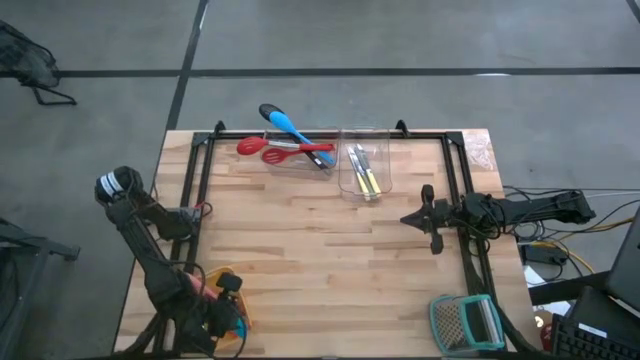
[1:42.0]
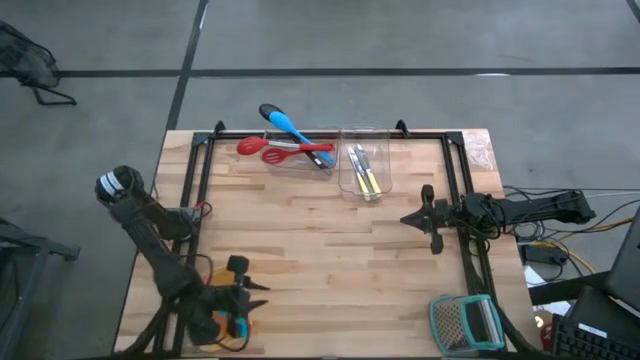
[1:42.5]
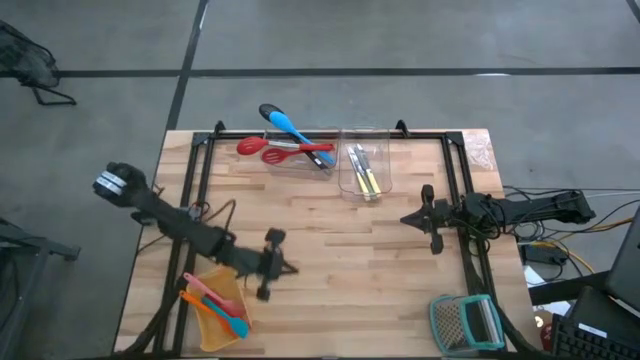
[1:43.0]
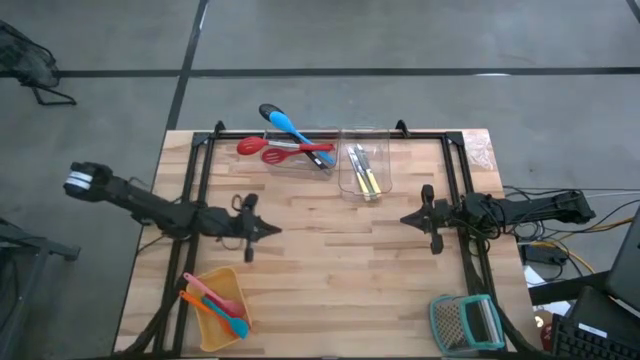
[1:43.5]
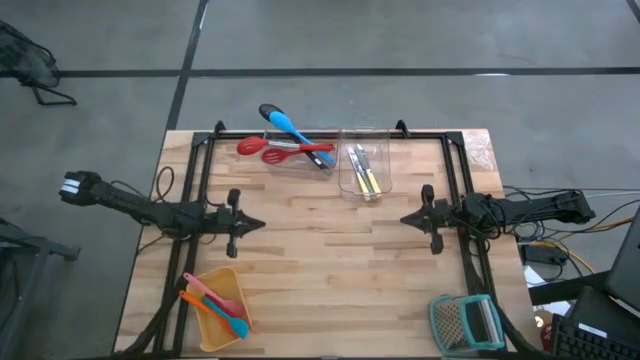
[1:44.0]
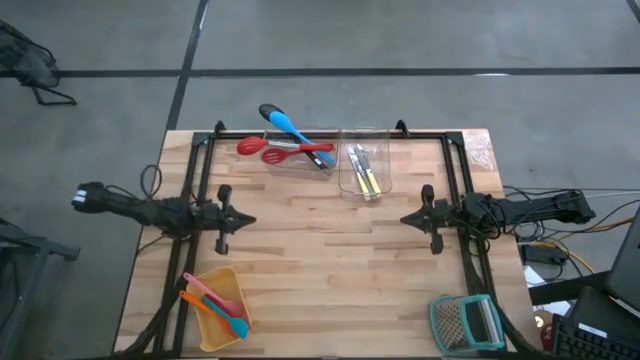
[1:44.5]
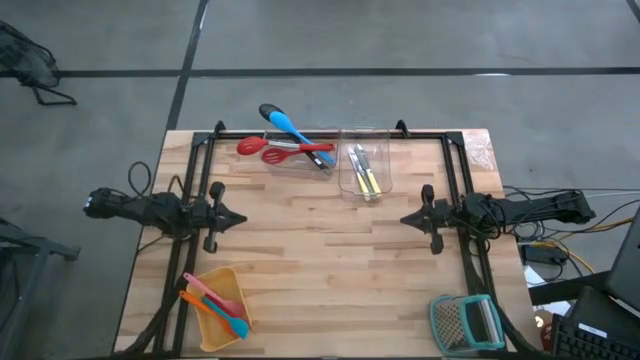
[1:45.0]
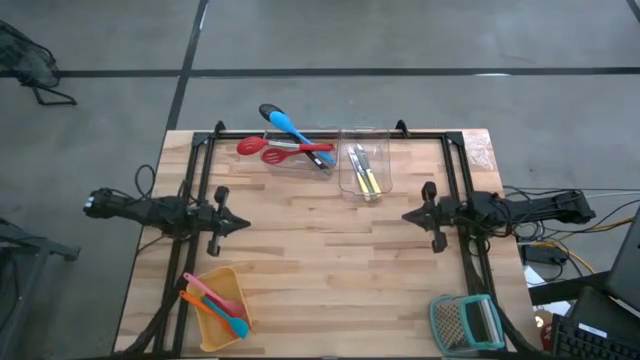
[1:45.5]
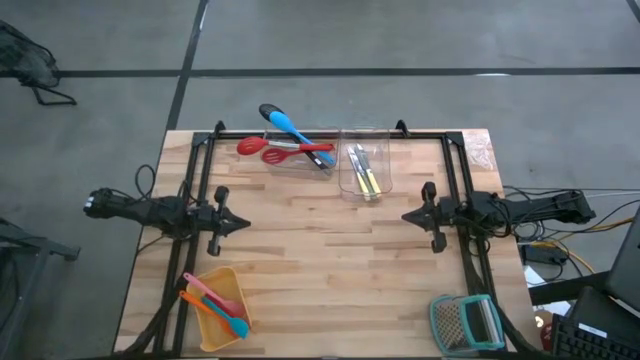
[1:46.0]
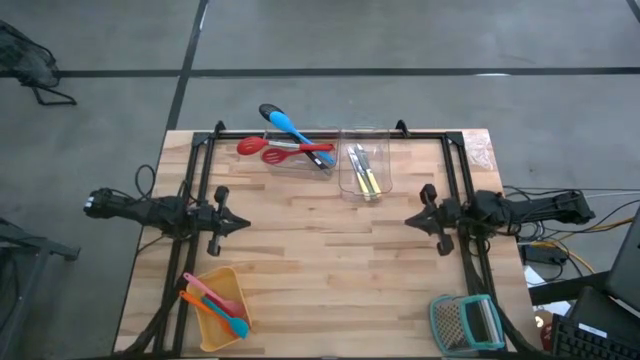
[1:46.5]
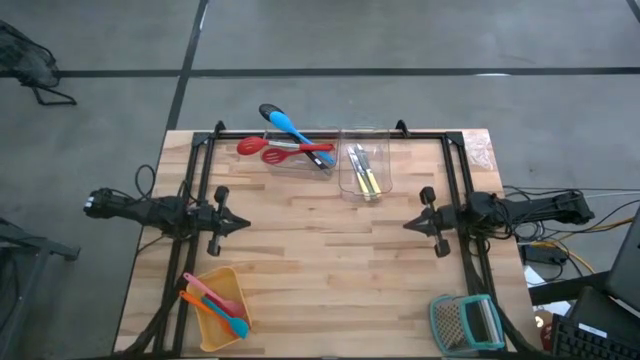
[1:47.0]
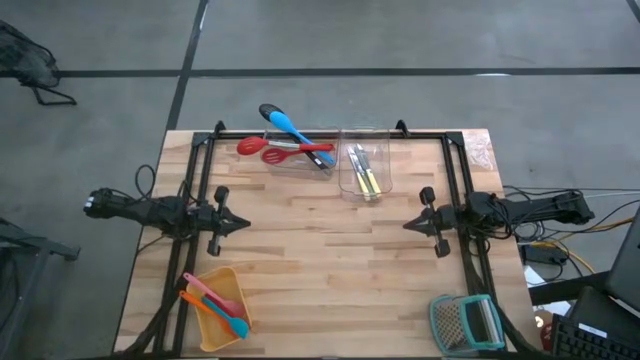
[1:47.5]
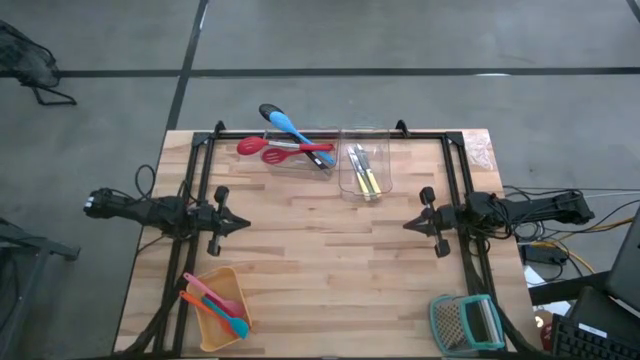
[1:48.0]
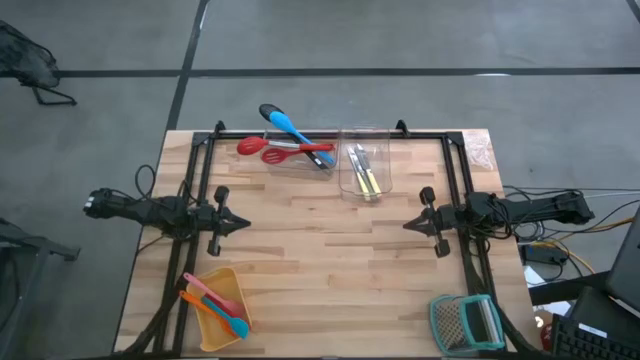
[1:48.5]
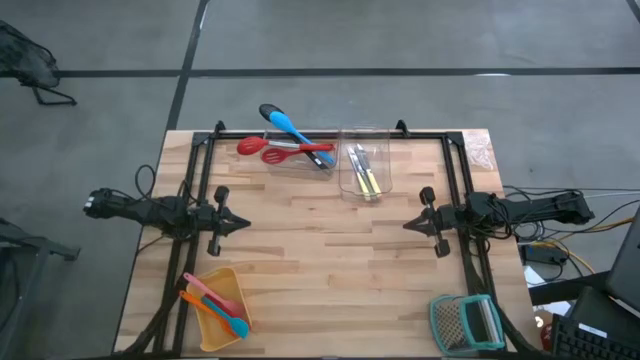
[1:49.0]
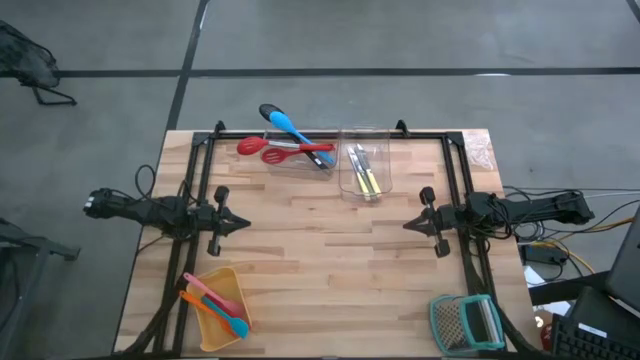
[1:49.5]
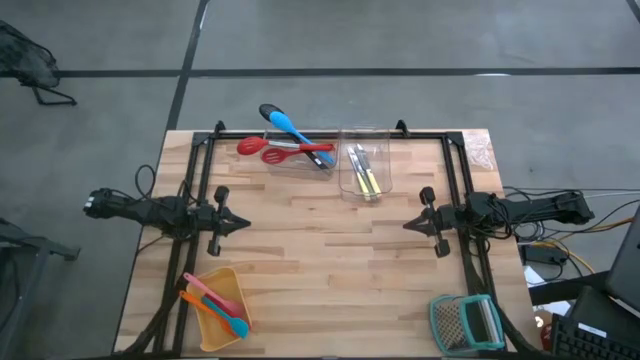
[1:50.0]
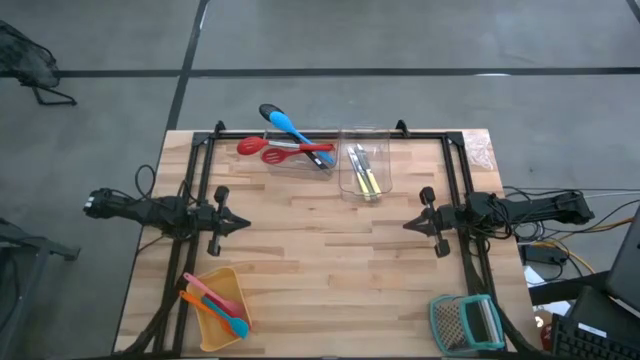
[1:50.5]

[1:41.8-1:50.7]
Task: Pick & Place Kitchen Items
Return to Home Position

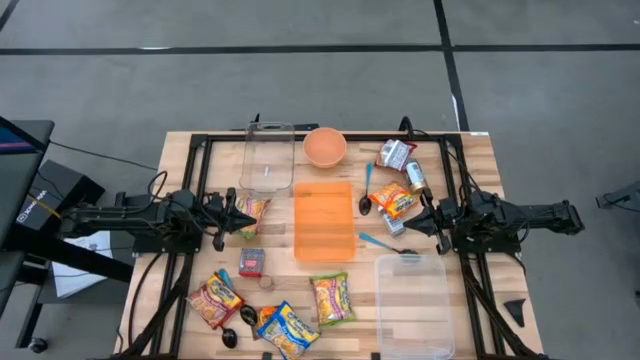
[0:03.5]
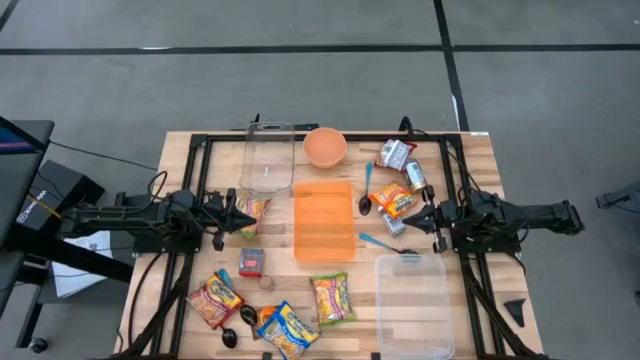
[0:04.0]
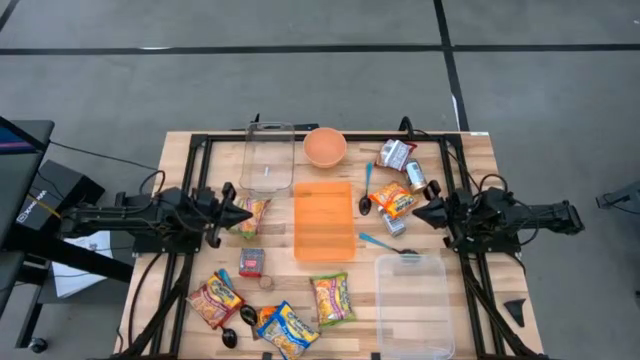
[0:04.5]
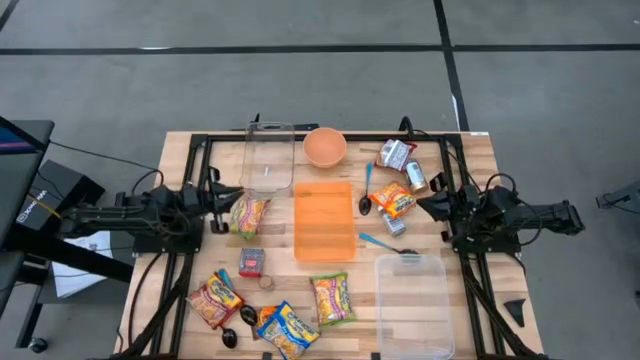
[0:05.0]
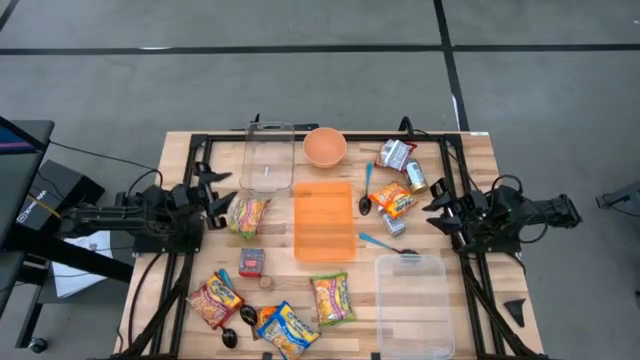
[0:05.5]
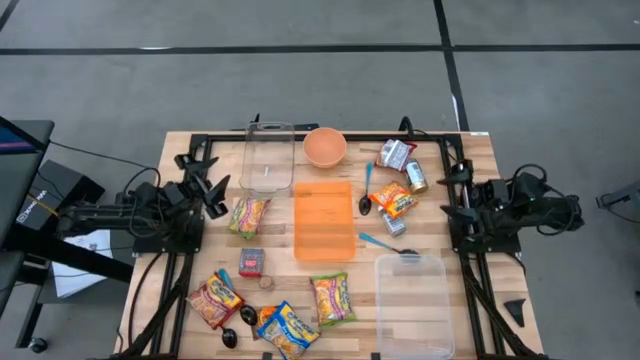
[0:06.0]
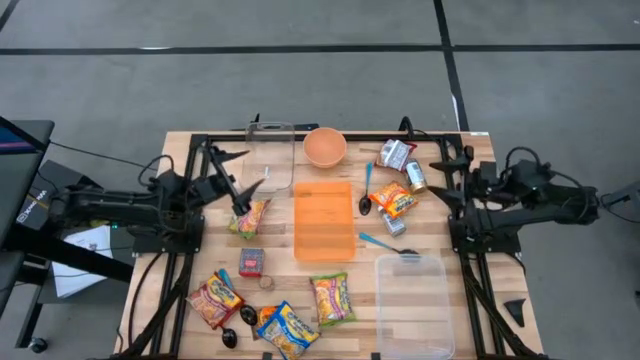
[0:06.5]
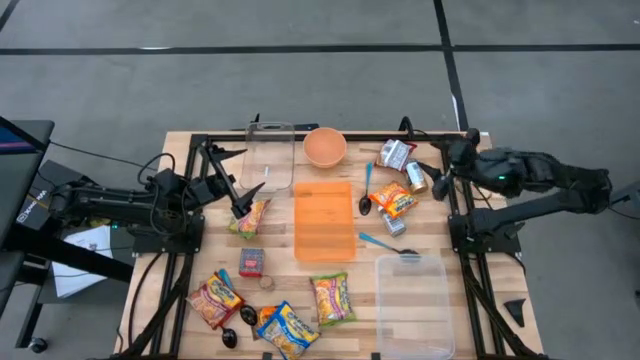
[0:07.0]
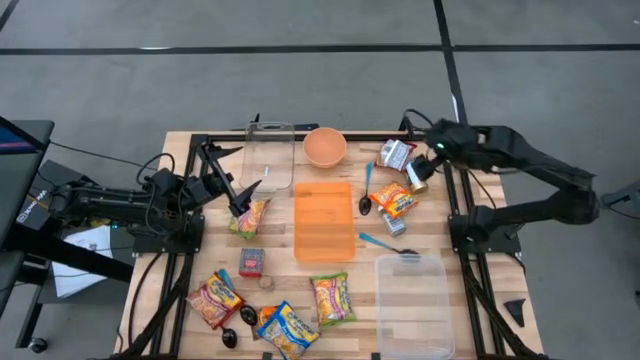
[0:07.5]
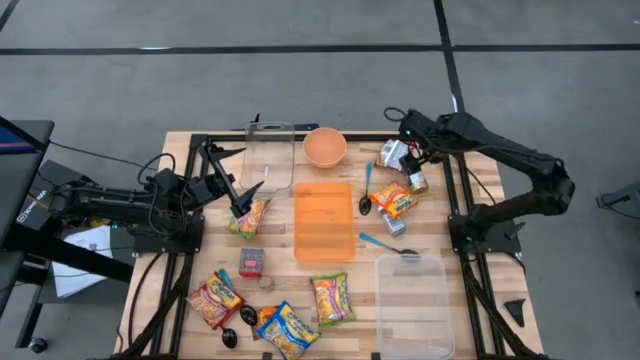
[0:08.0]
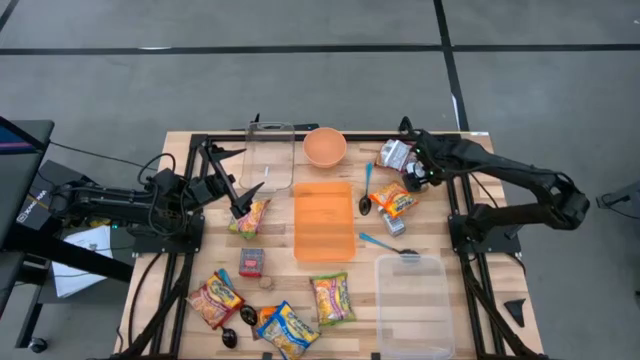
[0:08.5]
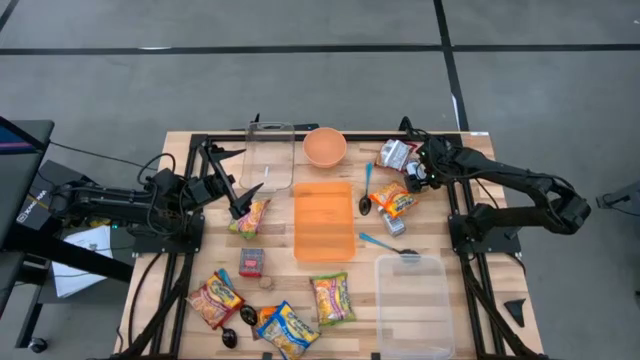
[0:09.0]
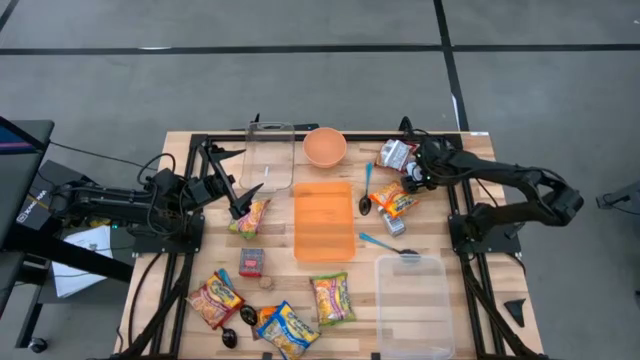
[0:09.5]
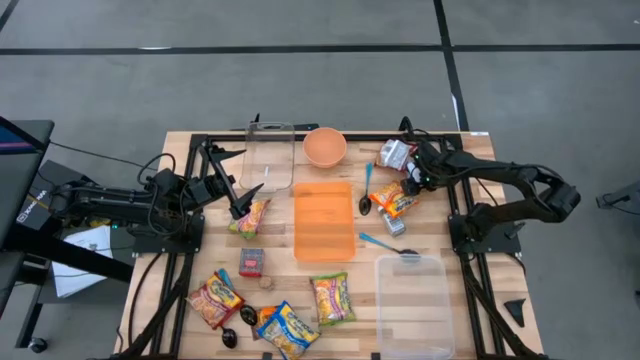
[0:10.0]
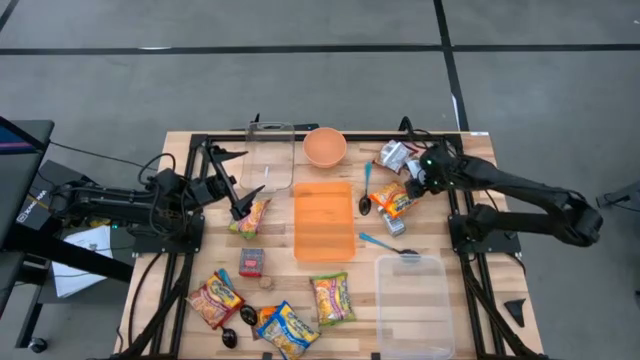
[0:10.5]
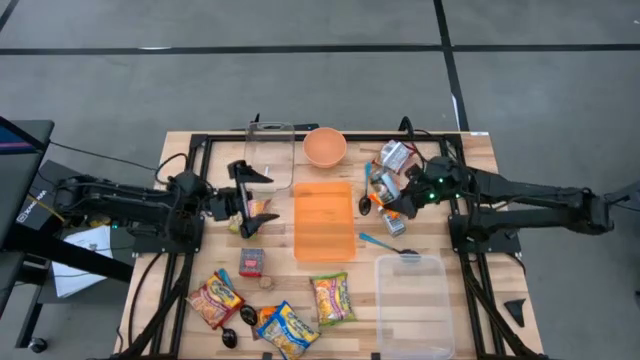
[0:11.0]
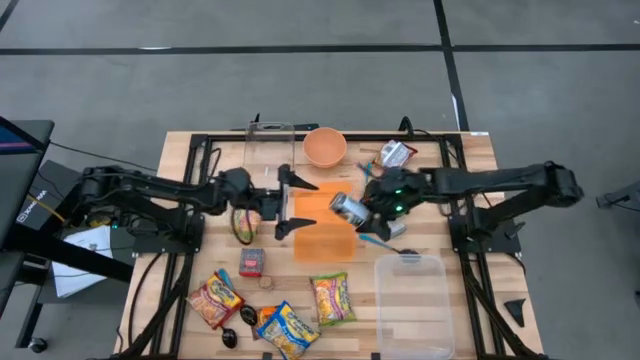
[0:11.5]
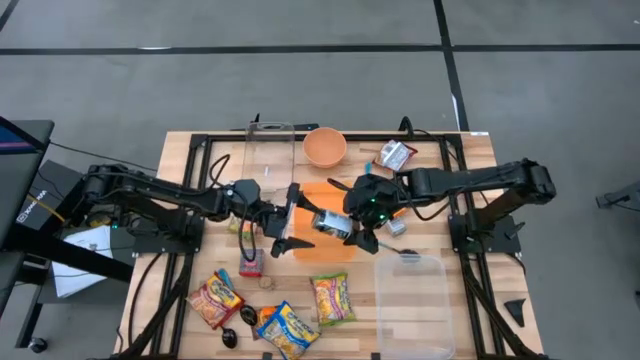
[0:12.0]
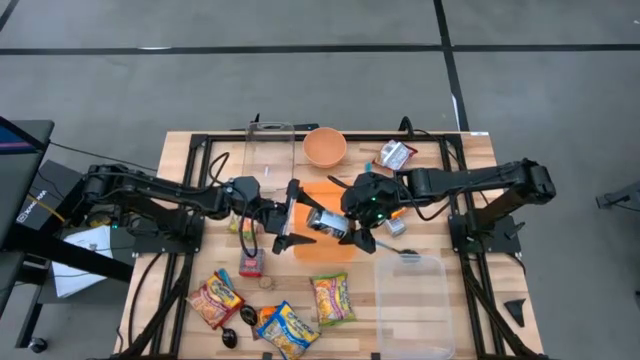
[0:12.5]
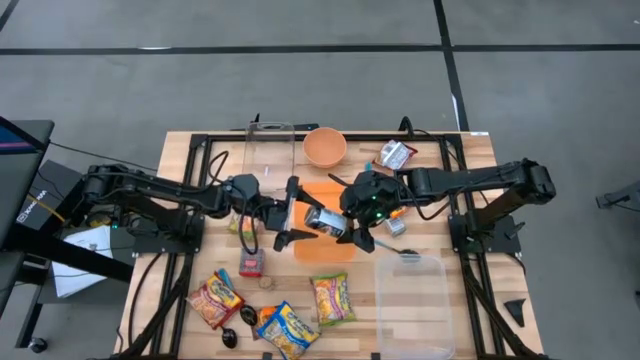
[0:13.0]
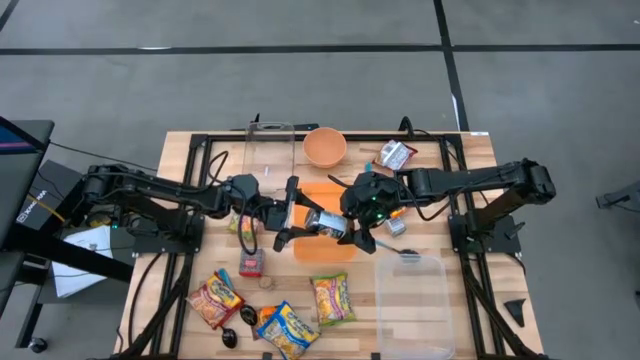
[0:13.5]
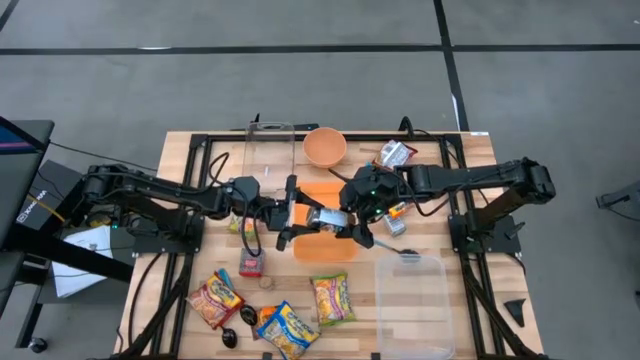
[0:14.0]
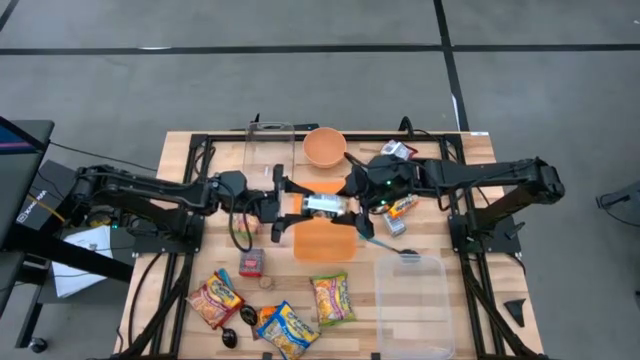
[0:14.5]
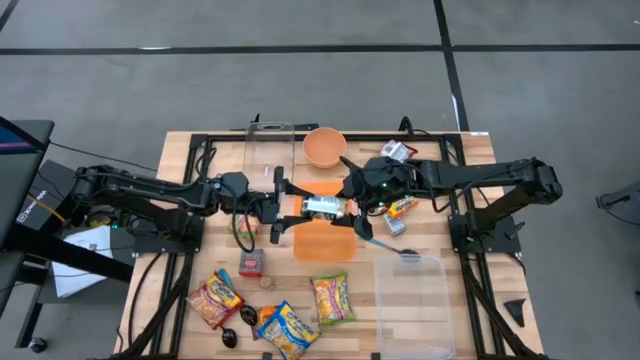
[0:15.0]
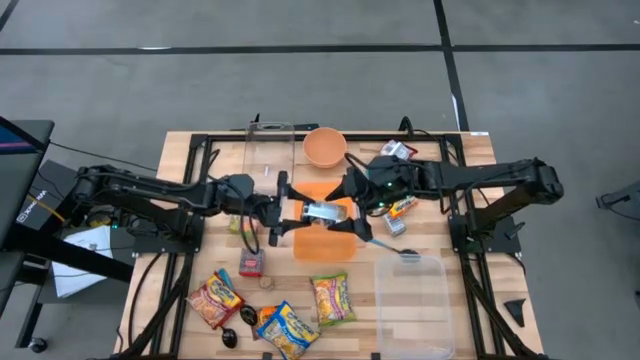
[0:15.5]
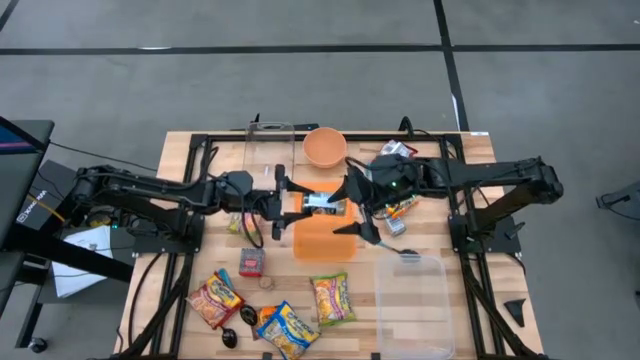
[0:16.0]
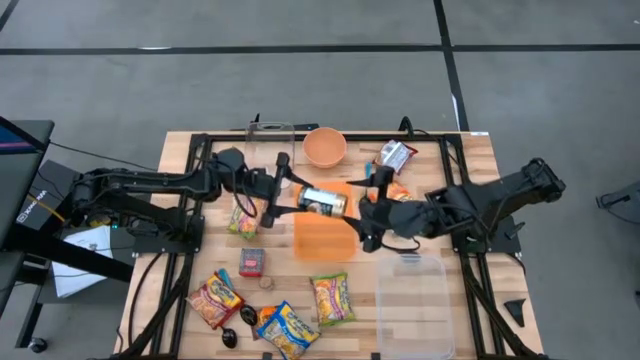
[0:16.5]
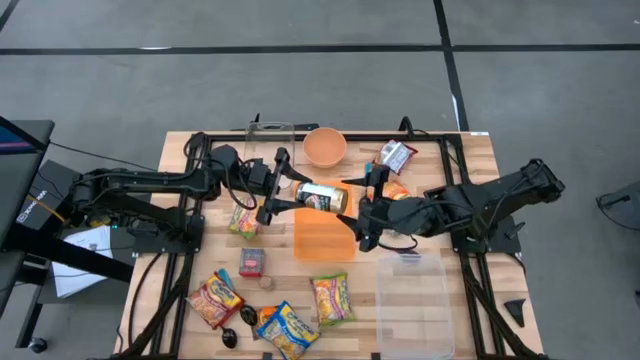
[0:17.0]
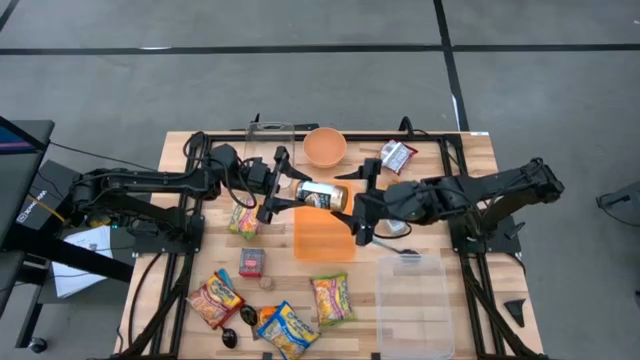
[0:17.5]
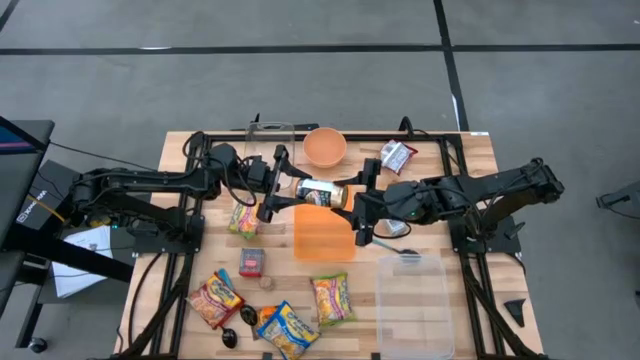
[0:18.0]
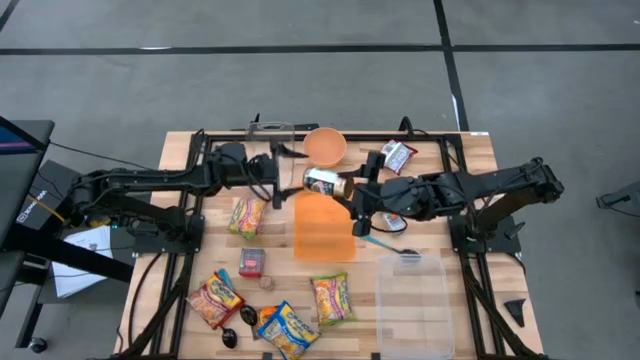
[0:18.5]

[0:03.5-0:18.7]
Task: Pick & Place Food Item
Put the golden seasoning bottle into the orange bin
